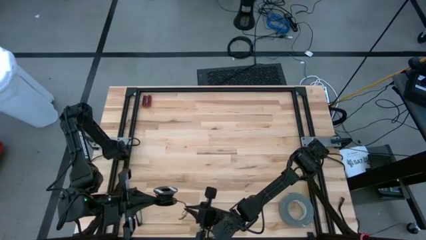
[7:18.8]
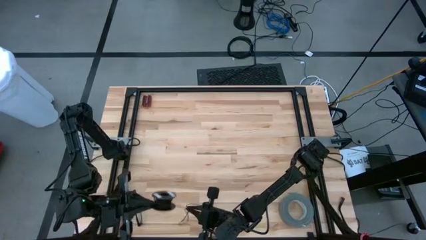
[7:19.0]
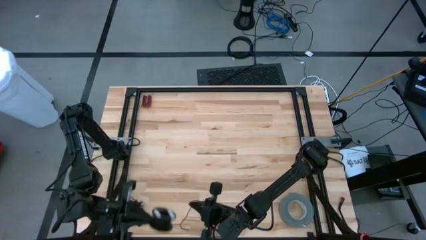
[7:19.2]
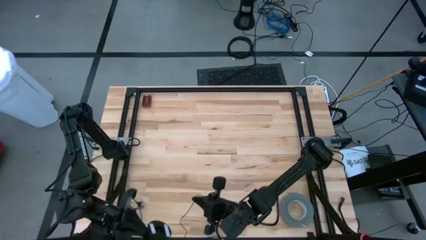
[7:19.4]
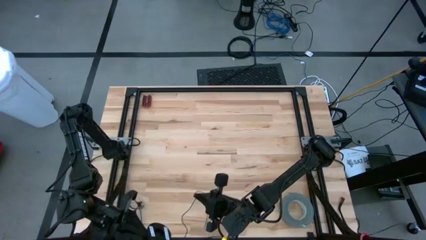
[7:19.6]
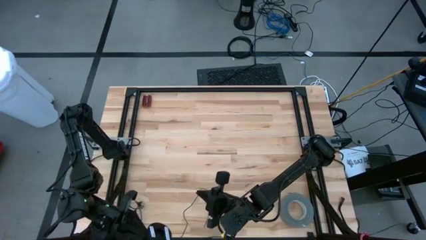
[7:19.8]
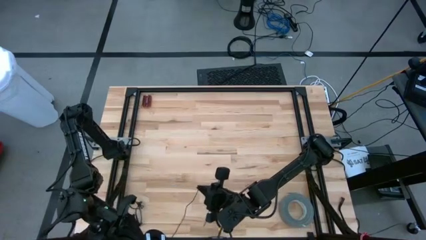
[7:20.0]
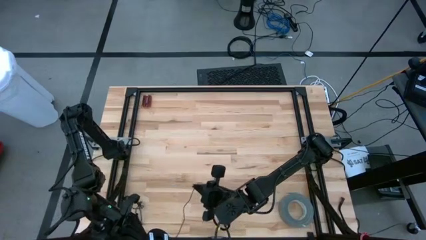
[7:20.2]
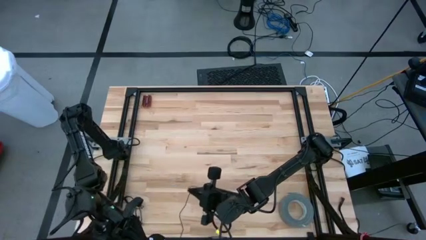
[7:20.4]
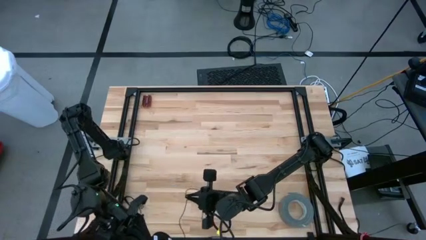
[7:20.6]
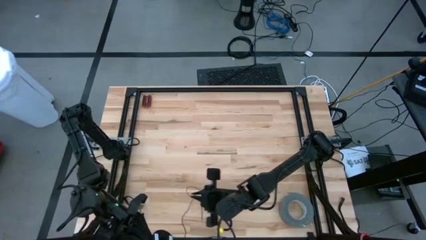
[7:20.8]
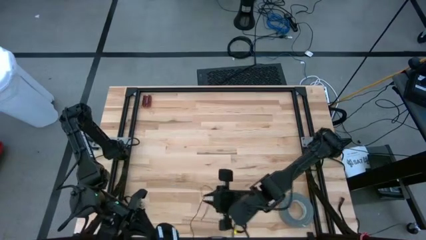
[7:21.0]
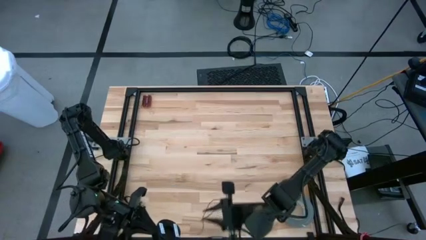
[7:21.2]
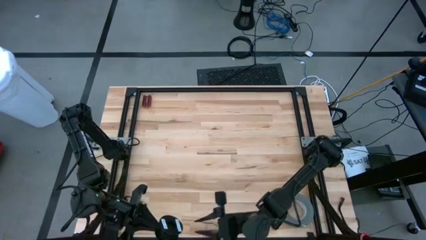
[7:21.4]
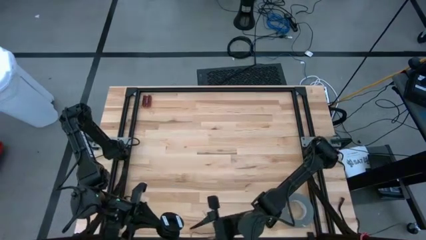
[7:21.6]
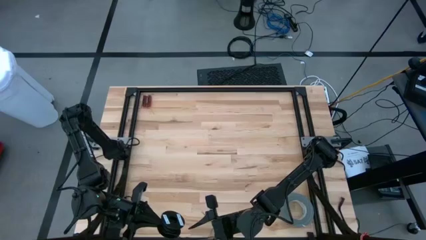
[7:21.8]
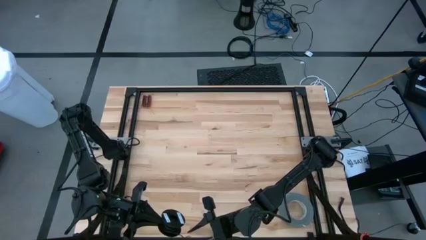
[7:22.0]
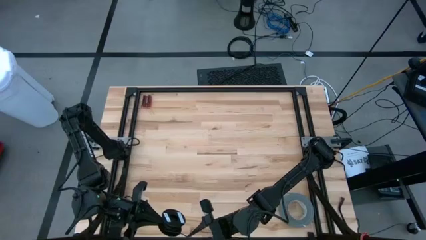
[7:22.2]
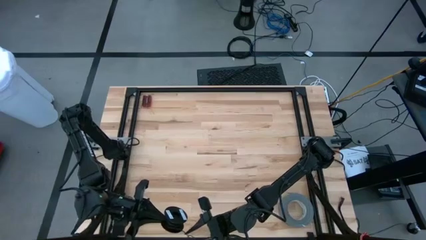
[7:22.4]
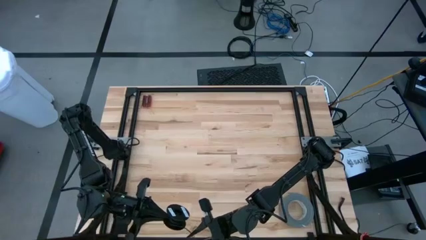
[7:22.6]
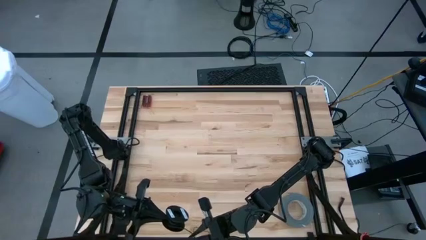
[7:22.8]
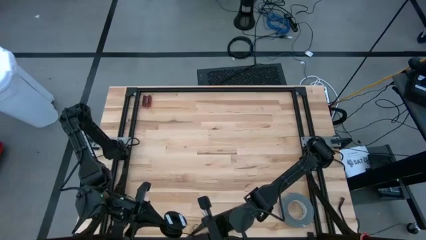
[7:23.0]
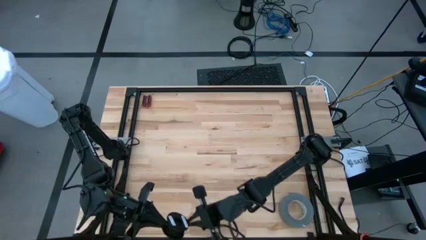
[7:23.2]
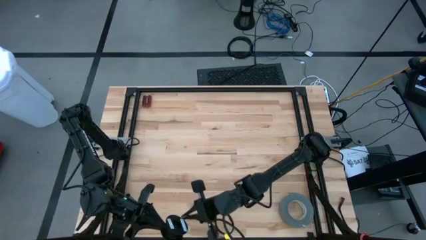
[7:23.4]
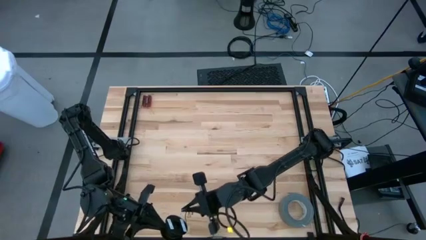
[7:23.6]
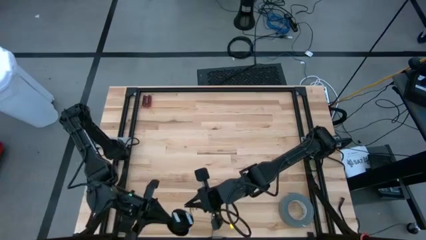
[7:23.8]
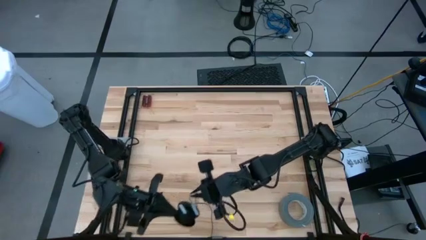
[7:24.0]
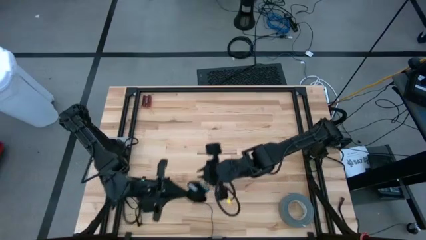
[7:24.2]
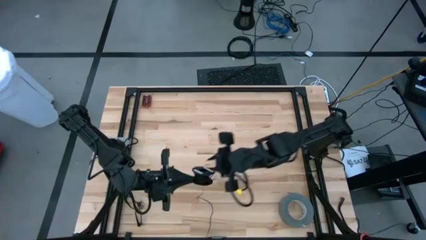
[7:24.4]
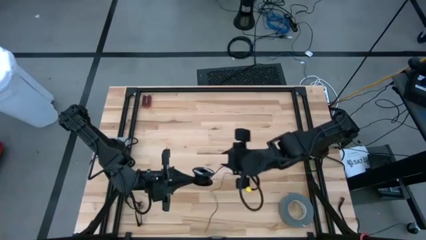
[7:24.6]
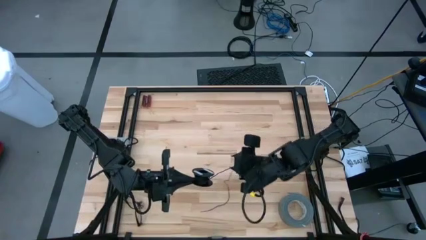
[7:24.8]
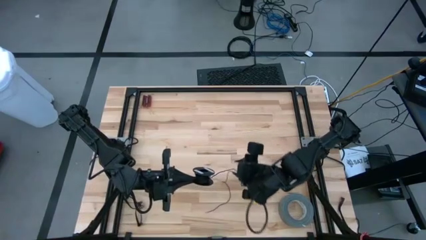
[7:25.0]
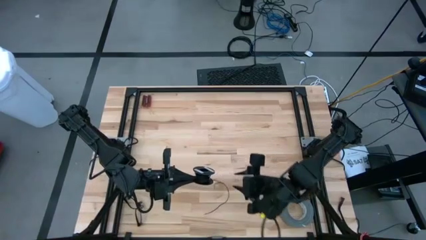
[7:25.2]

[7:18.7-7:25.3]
Task: Coil cords
Coil the black wire on the spool

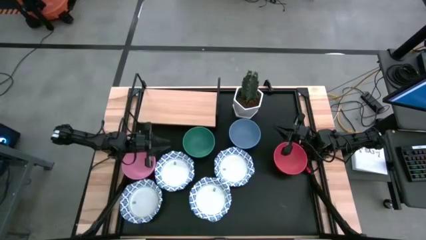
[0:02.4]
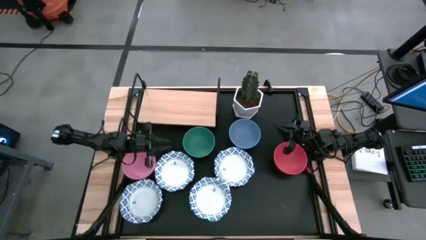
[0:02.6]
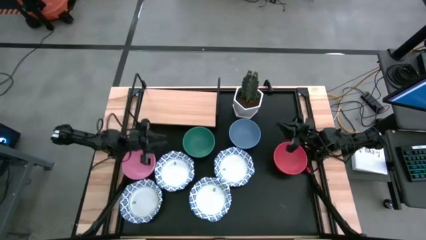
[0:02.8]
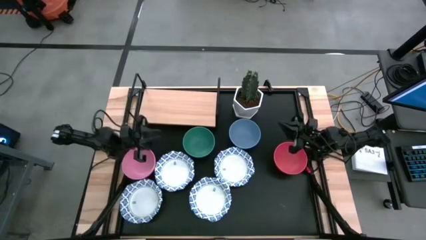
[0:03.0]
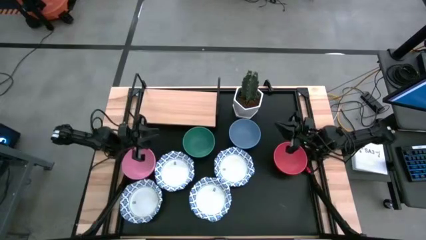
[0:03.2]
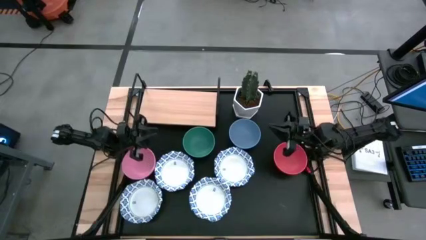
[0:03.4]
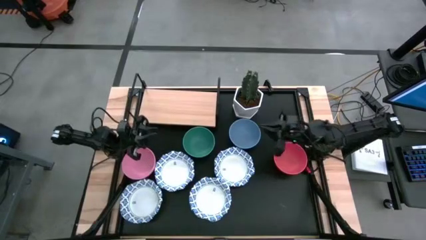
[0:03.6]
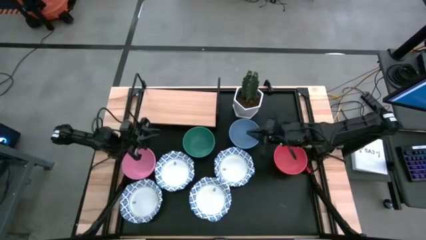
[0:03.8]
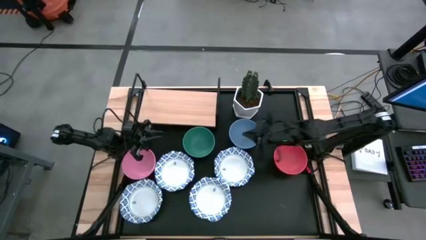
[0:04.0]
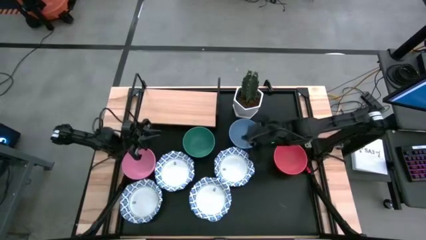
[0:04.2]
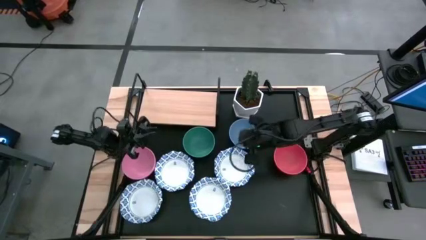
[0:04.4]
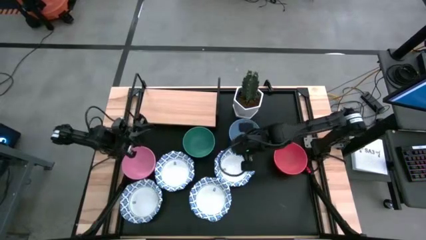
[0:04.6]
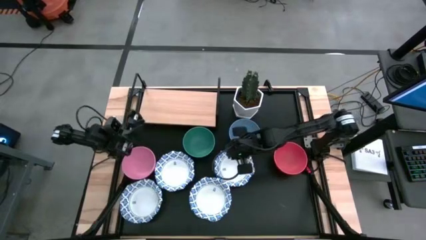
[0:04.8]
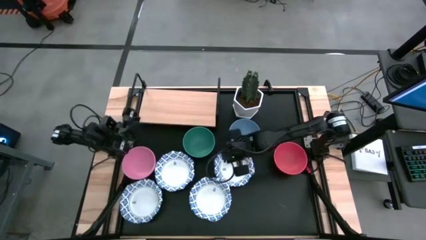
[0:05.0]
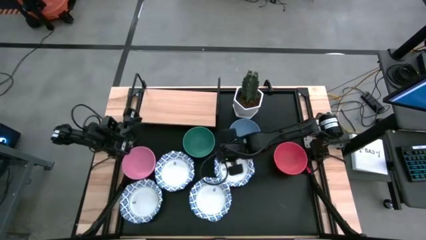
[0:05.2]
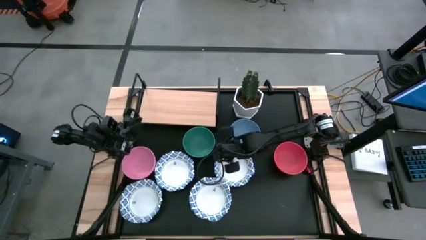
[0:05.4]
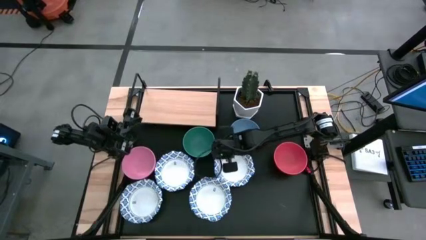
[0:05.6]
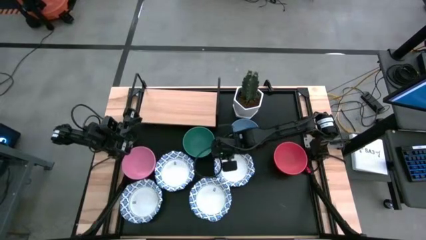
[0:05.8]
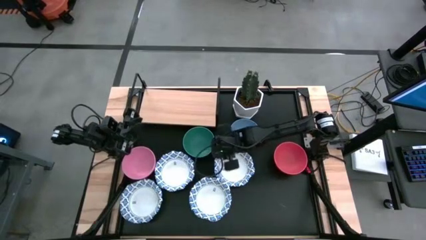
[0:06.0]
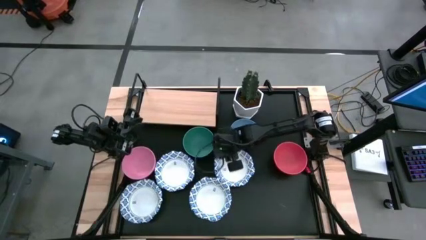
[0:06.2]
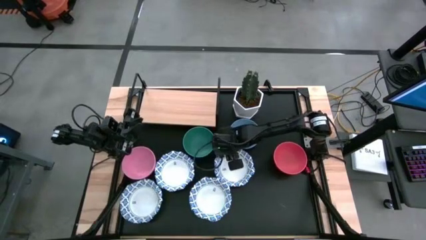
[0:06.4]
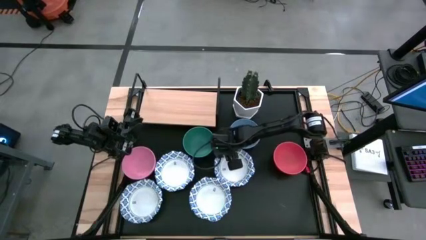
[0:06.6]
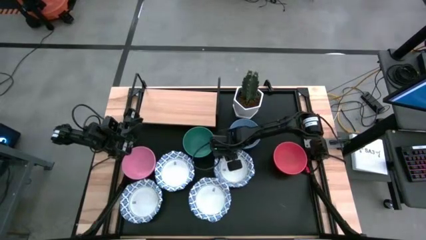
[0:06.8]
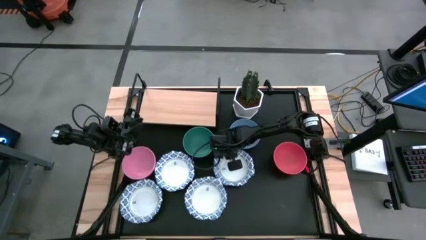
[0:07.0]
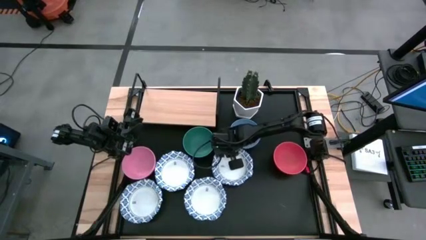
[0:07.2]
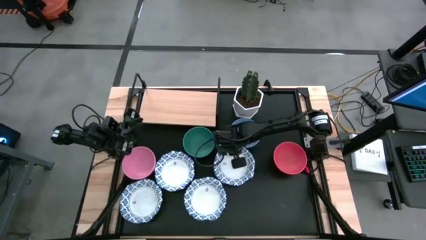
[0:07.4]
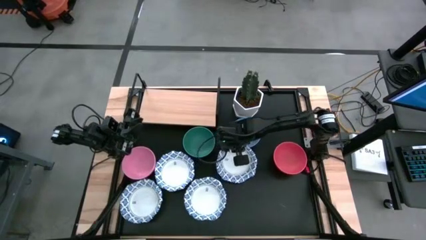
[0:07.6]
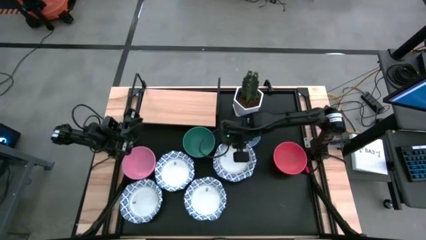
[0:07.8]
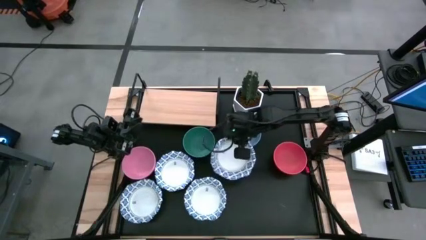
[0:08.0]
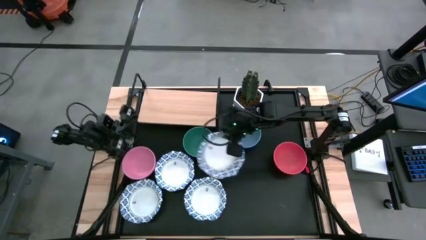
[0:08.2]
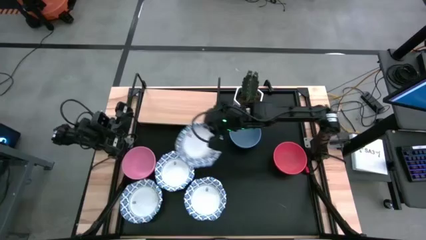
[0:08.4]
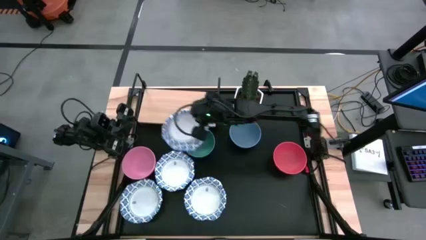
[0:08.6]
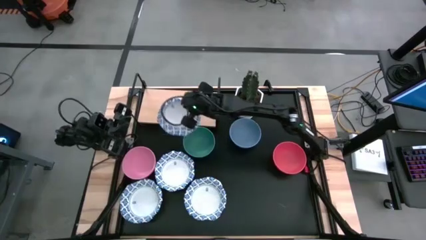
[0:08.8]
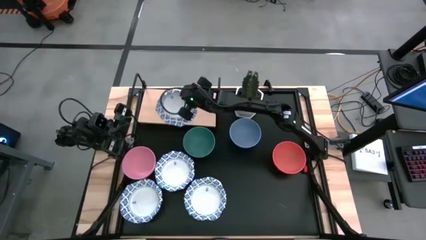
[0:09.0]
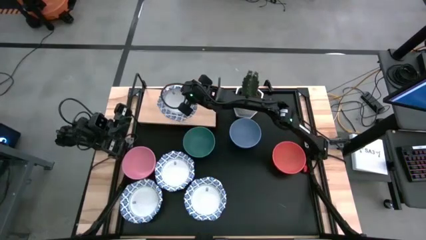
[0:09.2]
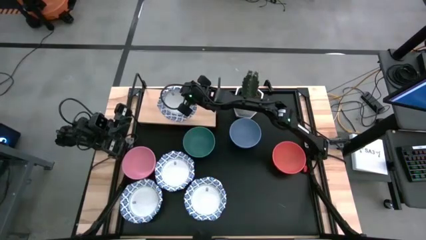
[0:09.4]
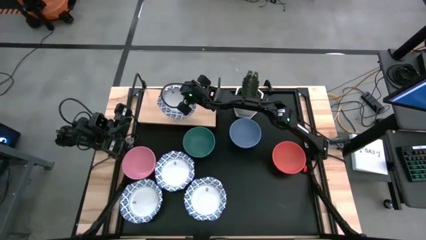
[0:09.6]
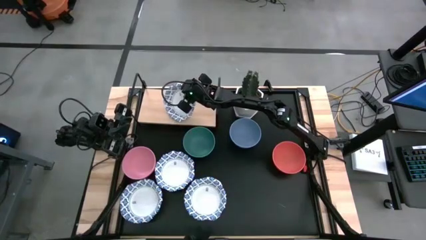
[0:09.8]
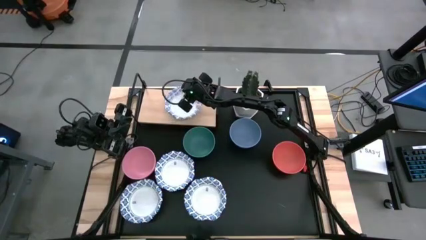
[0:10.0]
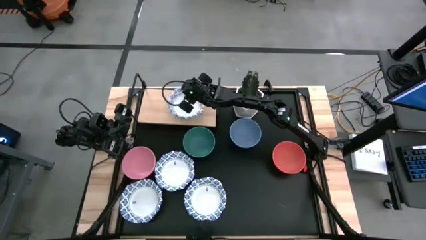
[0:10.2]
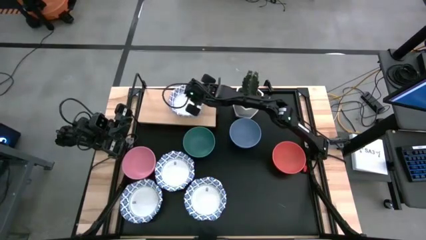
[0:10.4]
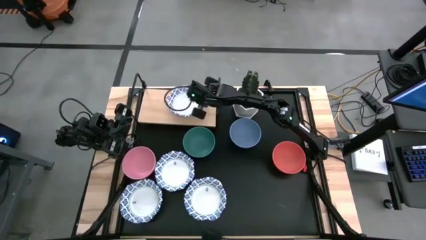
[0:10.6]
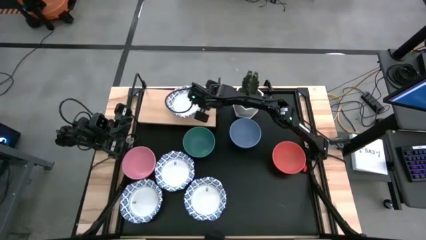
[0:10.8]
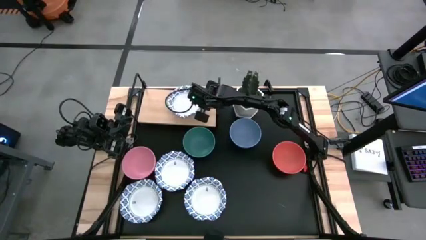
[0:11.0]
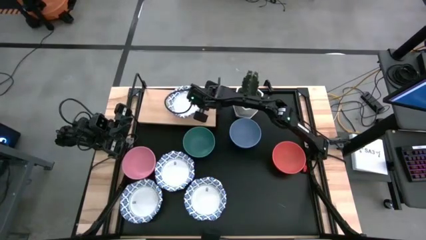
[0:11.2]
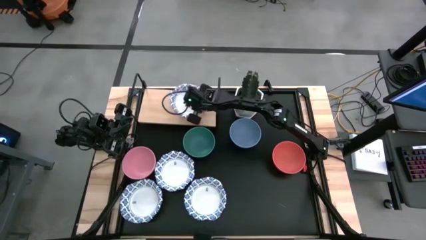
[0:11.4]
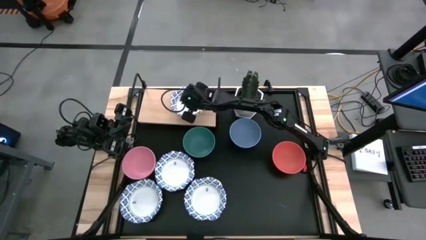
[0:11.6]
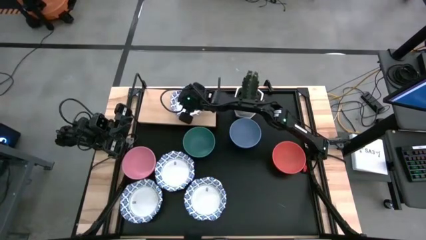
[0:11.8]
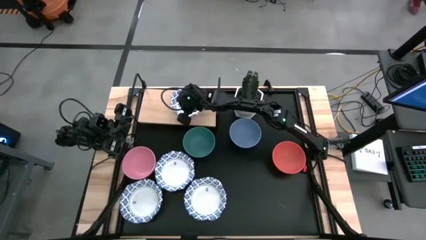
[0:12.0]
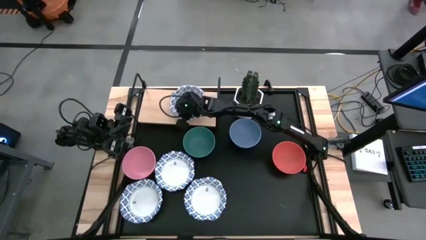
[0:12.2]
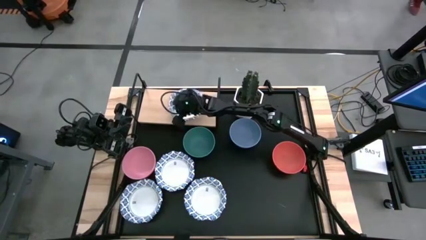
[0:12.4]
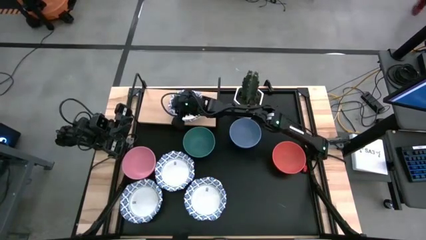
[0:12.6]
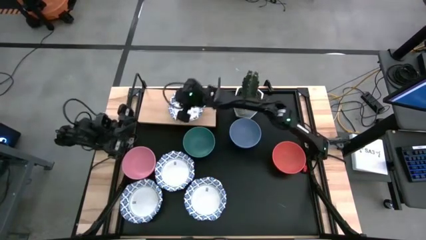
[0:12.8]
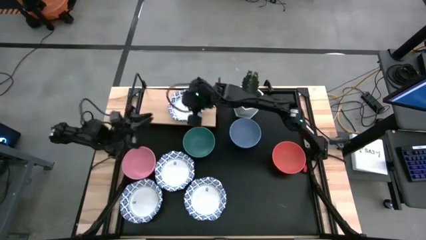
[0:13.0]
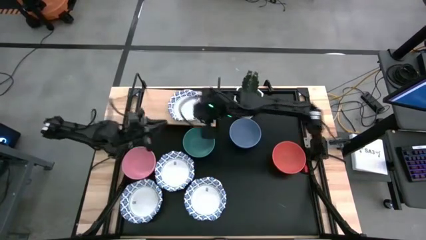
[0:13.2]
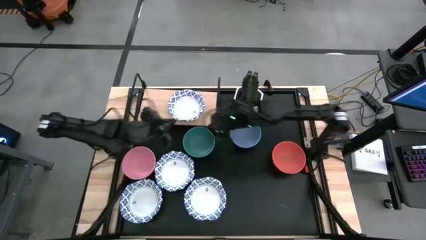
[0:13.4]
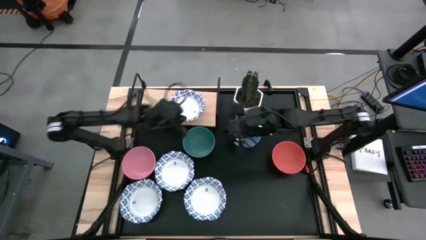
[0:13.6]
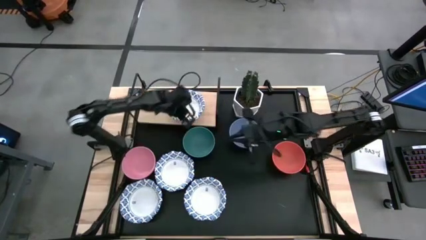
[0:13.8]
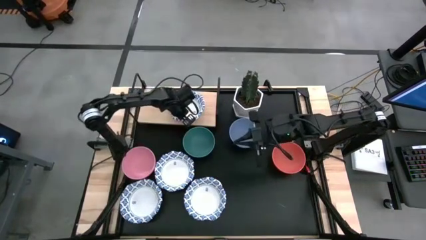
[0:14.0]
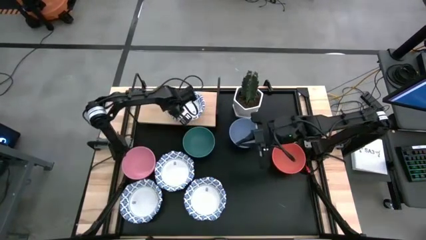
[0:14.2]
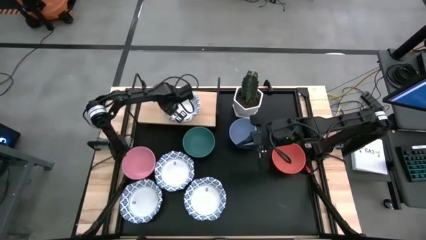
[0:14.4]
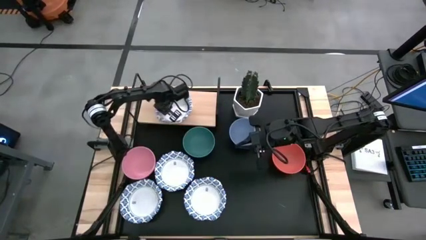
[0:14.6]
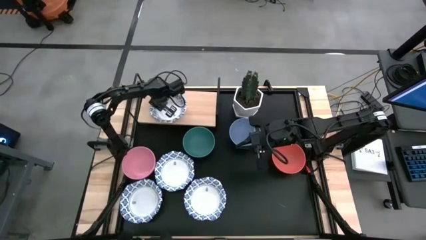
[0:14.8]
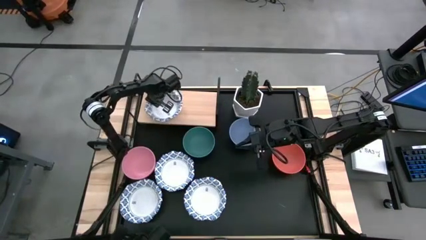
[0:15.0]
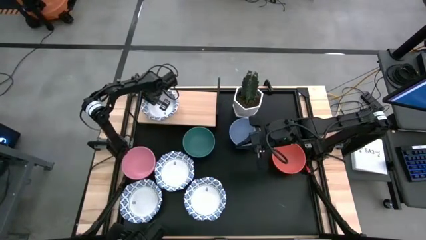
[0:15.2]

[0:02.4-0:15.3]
Task: Place and stack bowls onto a shelf
Put the top right white patterned paper bowl on the shelf
